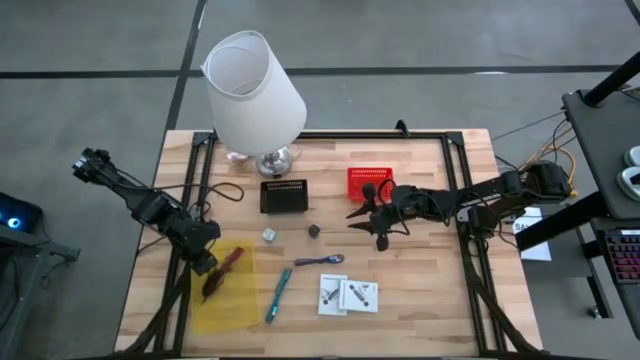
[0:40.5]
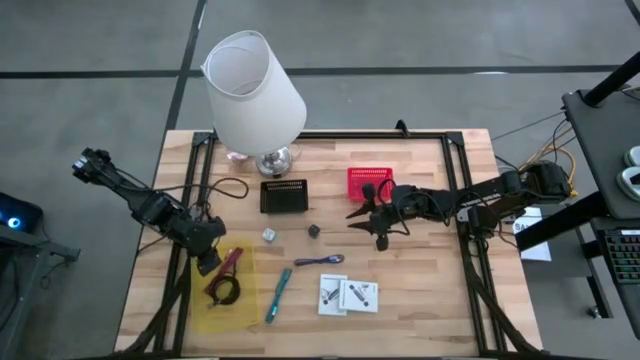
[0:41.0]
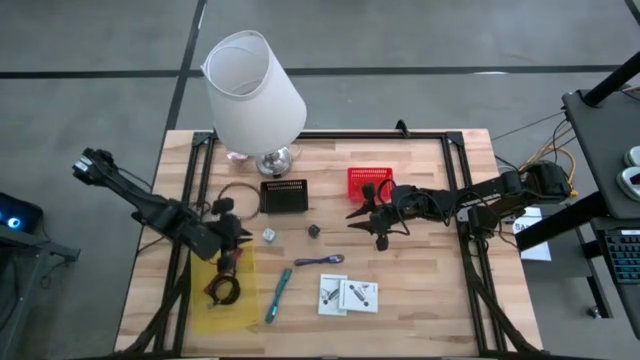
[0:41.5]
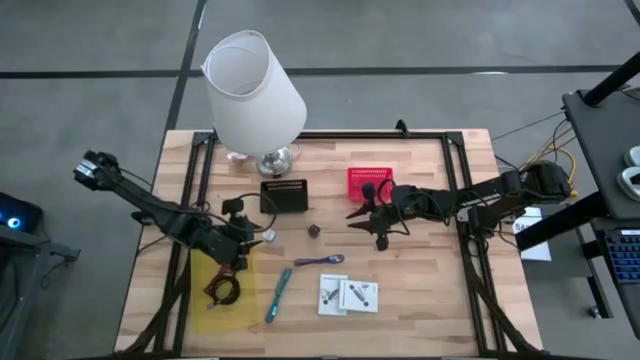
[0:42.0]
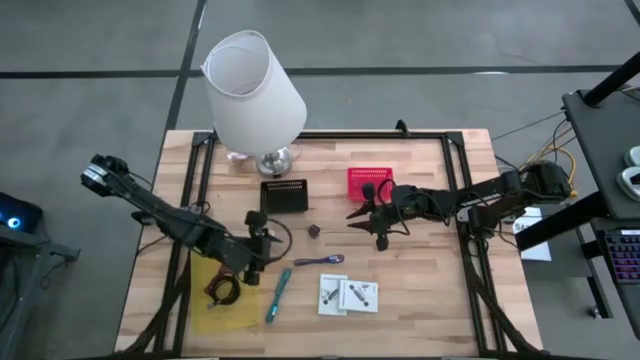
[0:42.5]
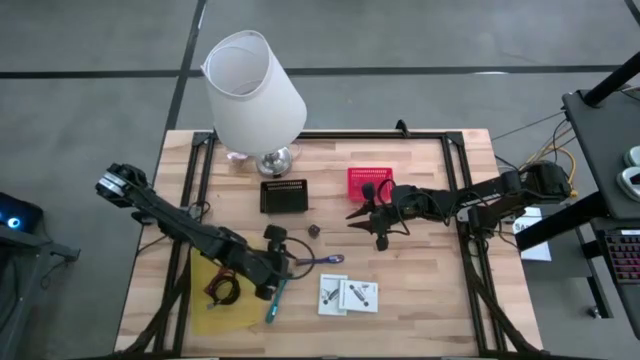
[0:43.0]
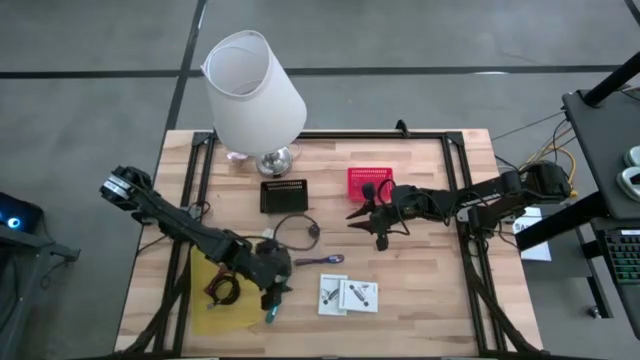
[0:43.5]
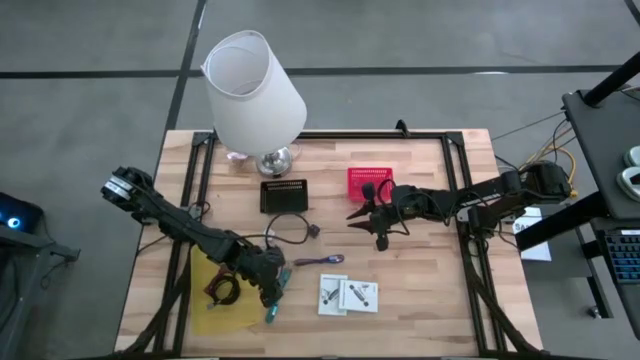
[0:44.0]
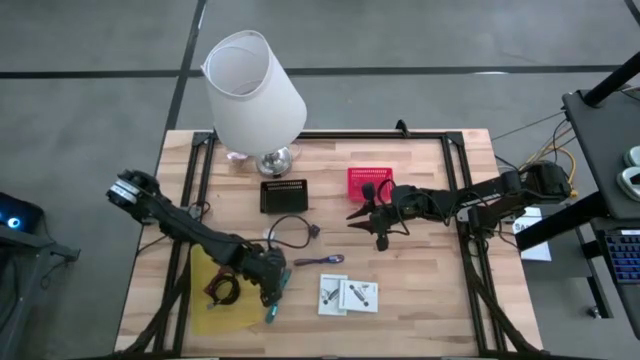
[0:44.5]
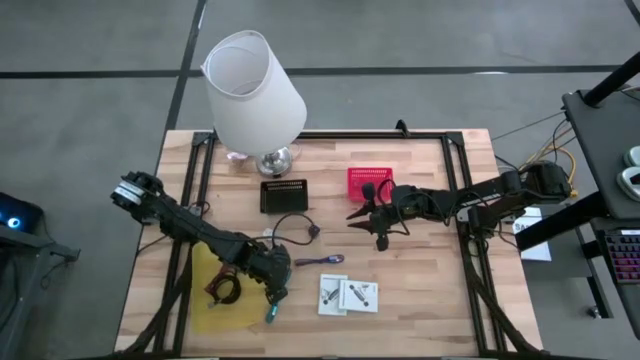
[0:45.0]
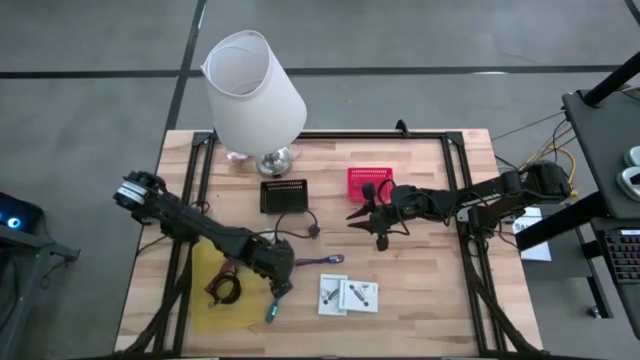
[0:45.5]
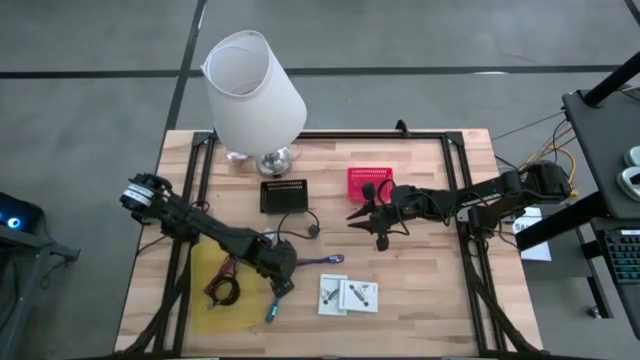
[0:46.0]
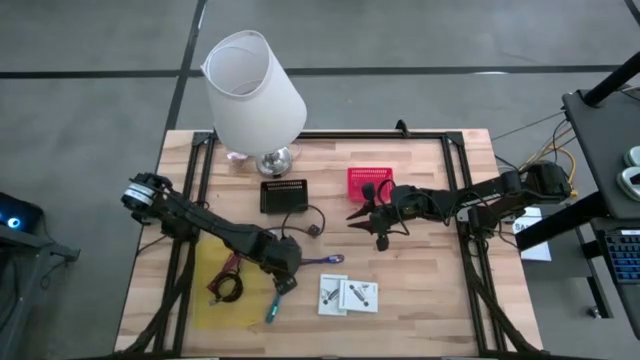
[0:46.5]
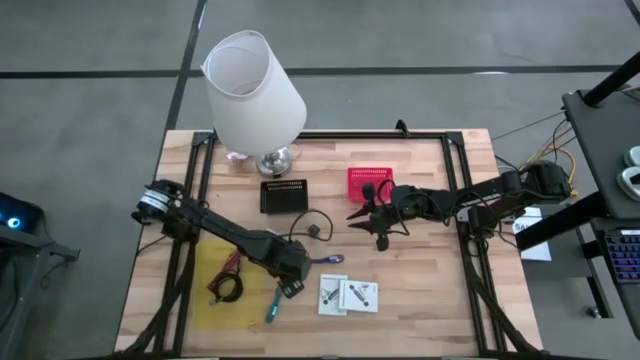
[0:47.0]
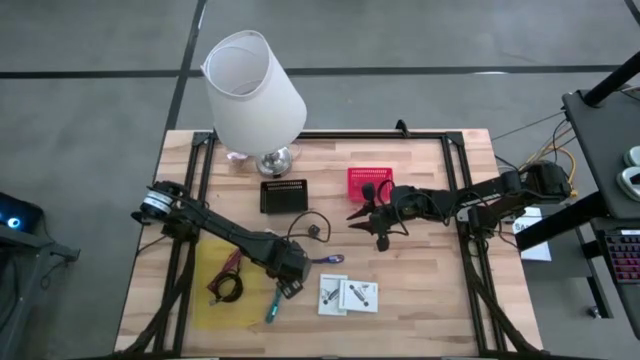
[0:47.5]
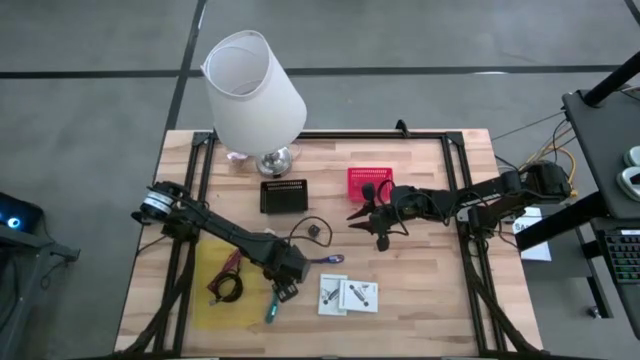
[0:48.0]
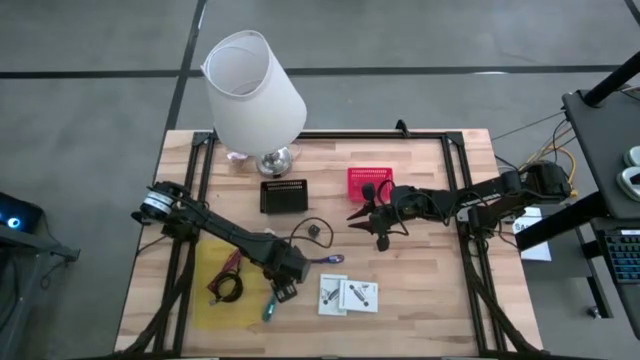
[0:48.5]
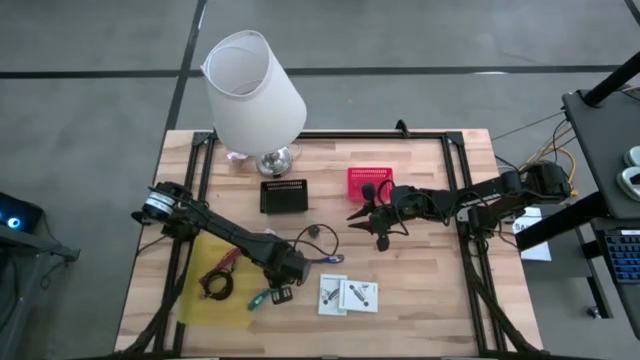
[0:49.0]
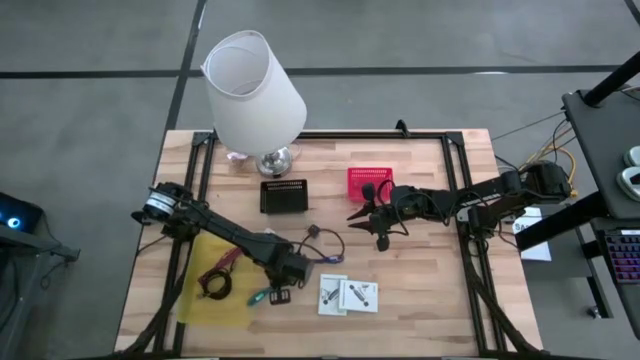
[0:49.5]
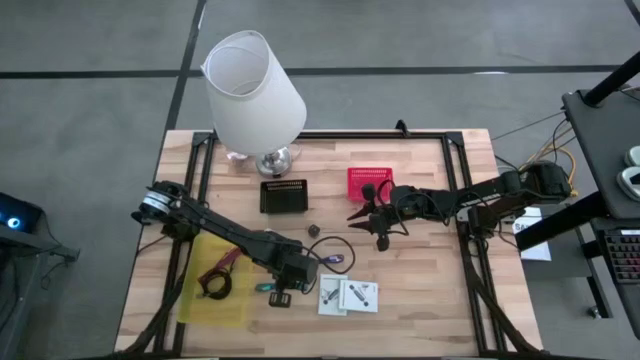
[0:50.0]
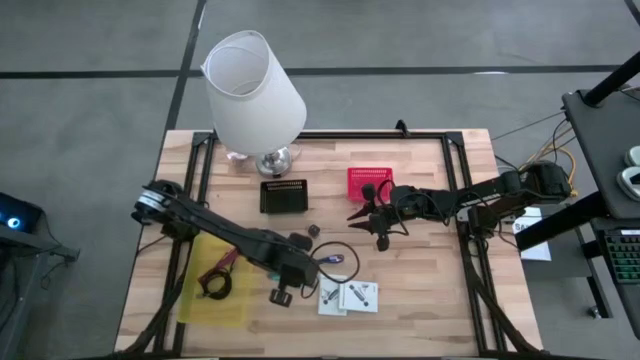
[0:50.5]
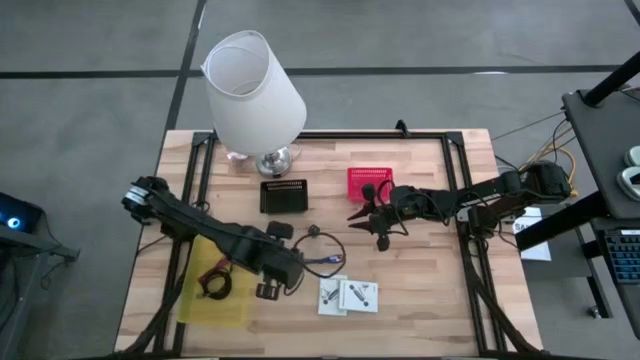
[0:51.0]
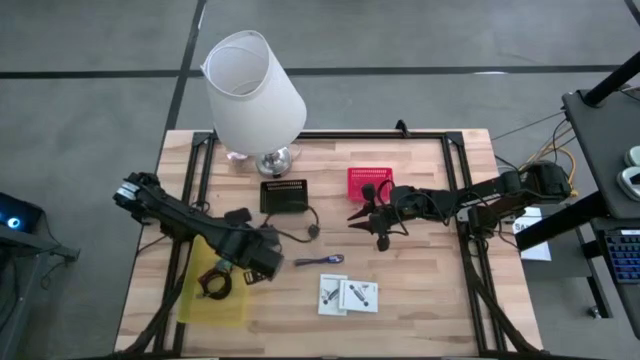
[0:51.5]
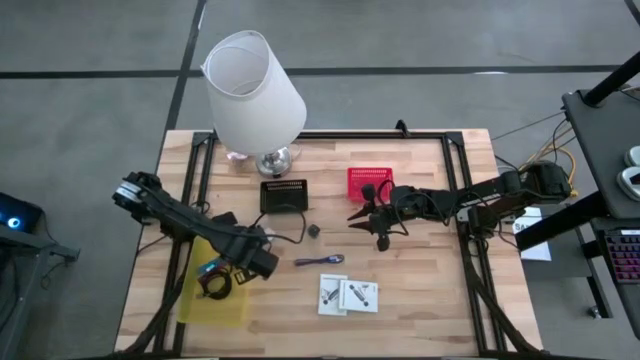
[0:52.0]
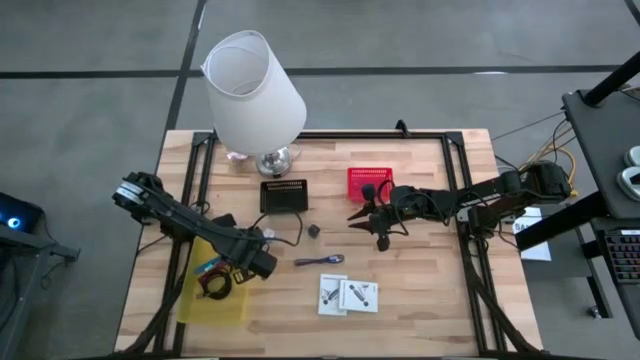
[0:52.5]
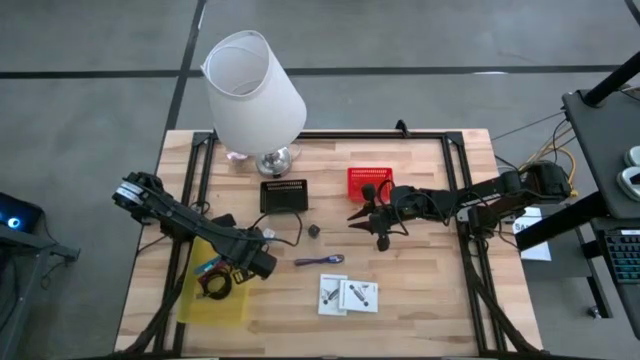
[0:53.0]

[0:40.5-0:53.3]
Task: Pick and place items into bin
Put the blue charger cable into the yellow bin

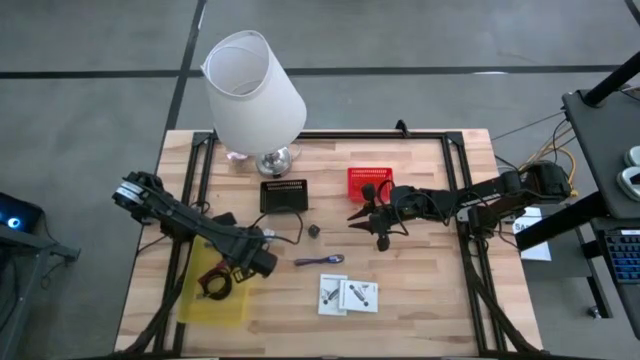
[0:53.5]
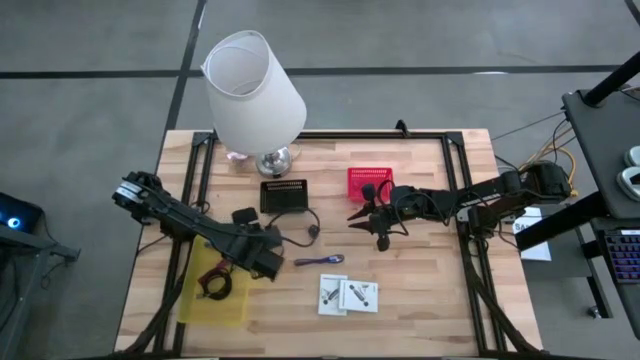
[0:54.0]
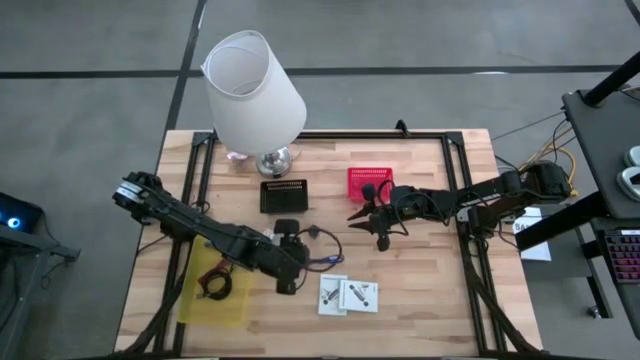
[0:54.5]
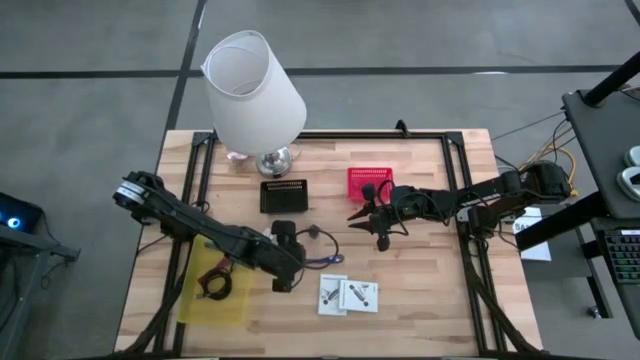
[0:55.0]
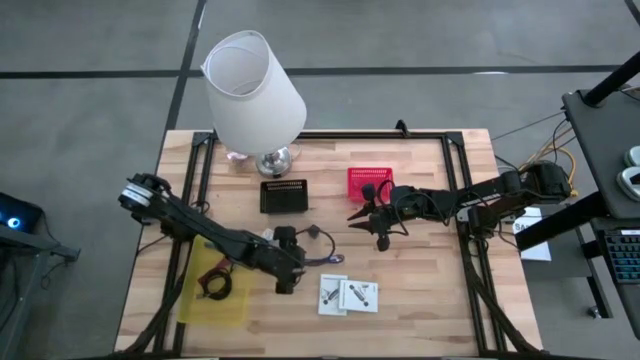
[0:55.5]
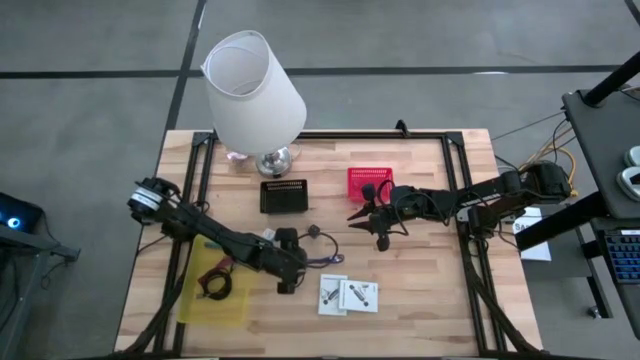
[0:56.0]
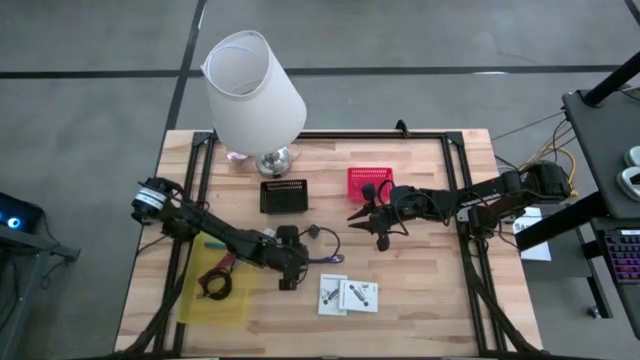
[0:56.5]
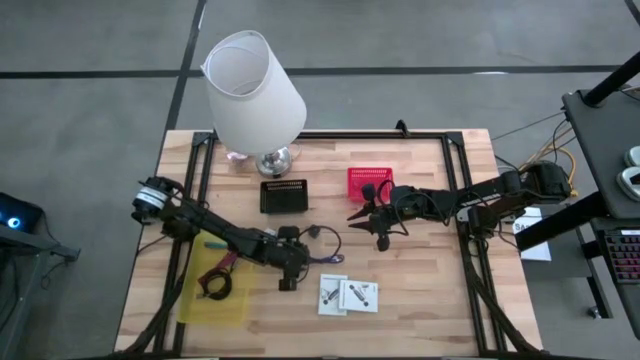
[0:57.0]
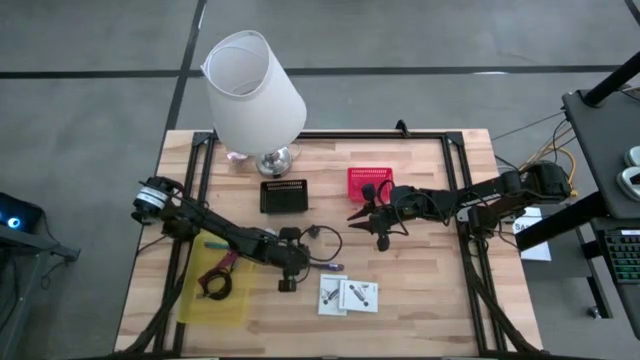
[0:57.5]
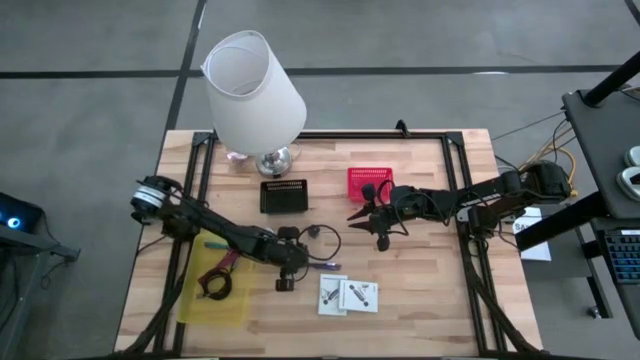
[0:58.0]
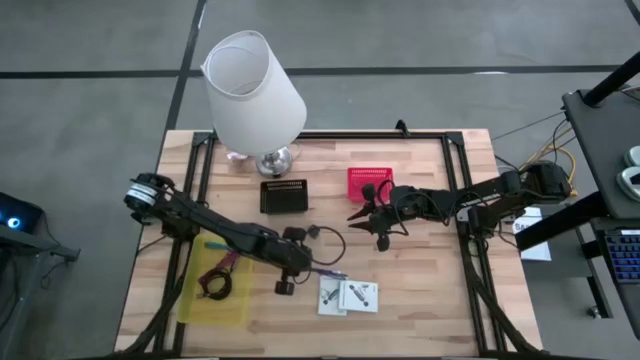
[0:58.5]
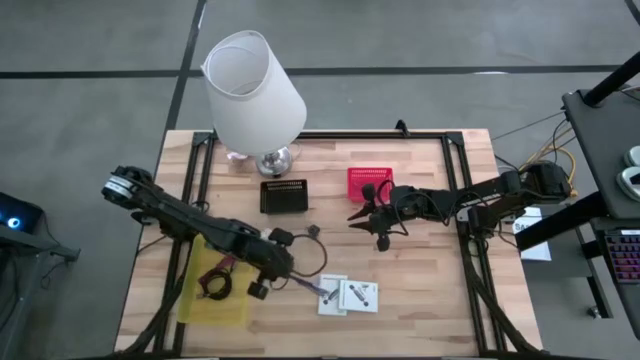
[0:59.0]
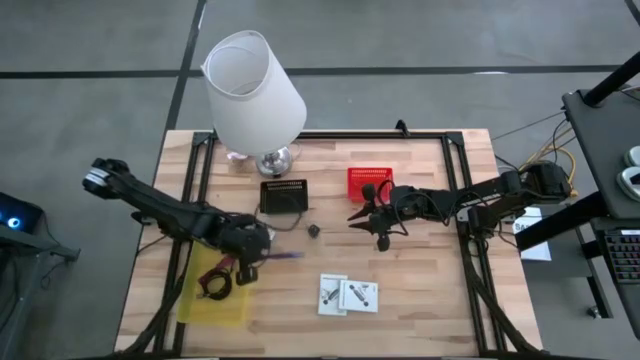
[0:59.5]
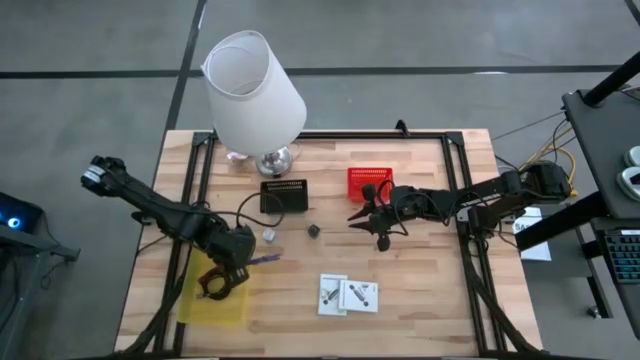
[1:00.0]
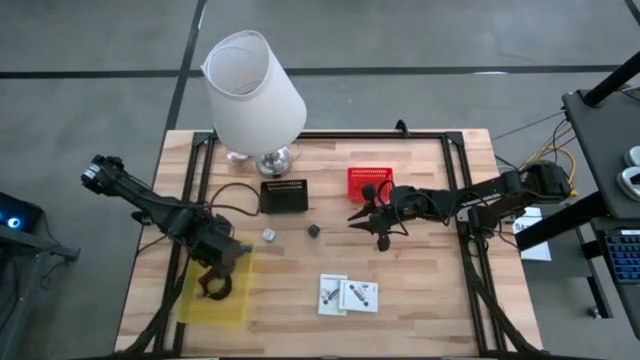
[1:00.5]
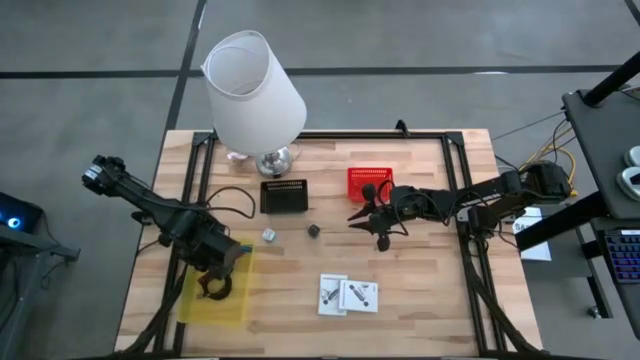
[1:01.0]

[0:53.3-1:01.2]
Put the violet charger cable into the yellow bin
